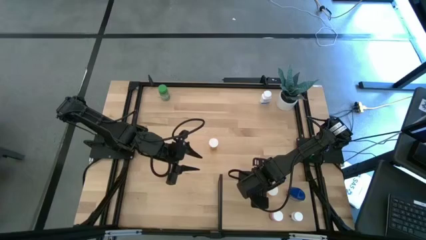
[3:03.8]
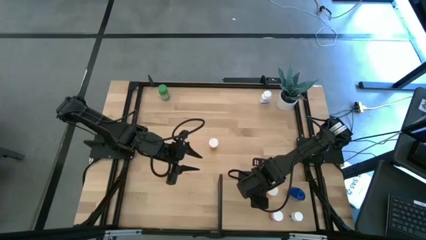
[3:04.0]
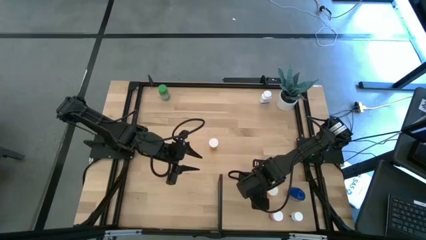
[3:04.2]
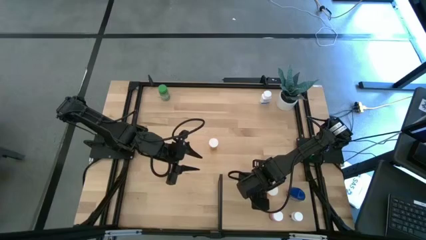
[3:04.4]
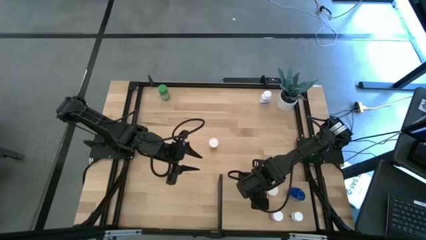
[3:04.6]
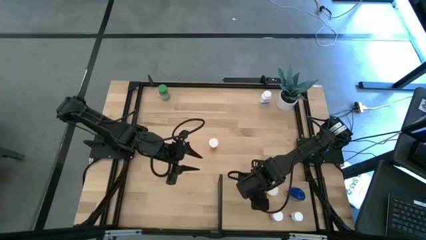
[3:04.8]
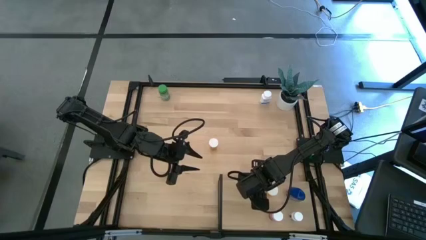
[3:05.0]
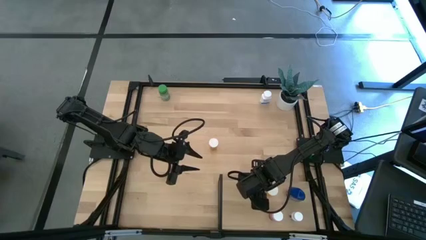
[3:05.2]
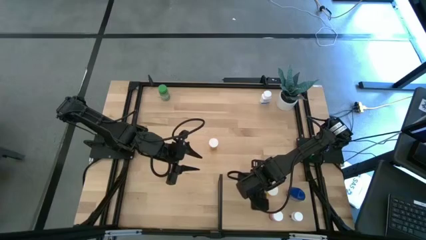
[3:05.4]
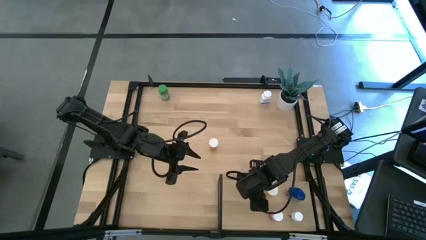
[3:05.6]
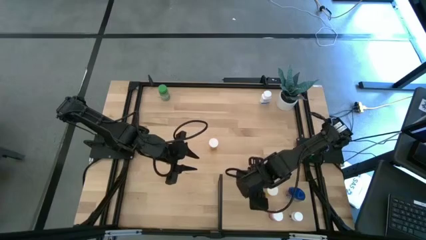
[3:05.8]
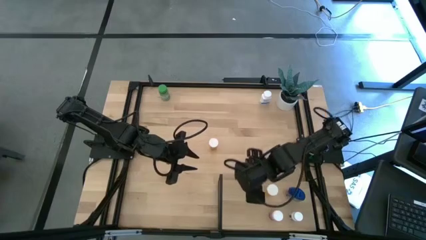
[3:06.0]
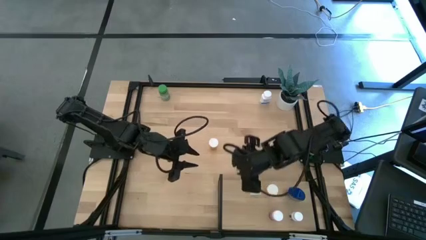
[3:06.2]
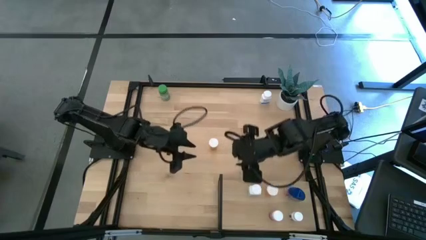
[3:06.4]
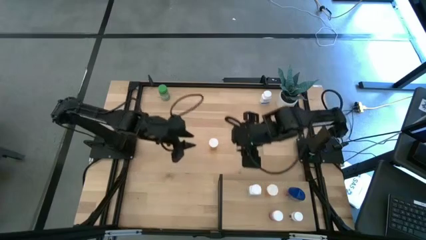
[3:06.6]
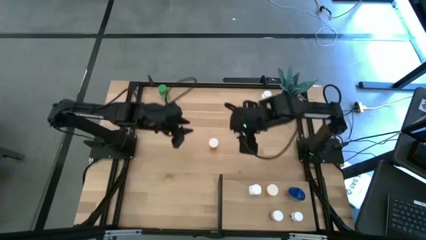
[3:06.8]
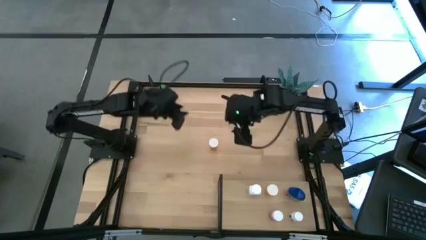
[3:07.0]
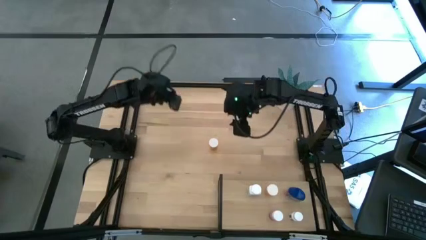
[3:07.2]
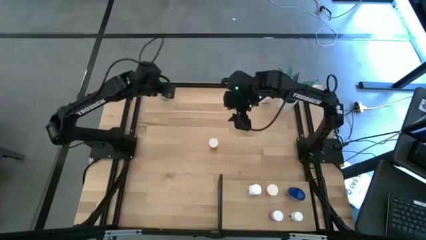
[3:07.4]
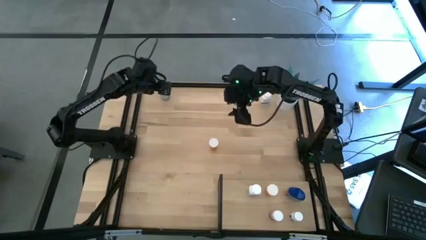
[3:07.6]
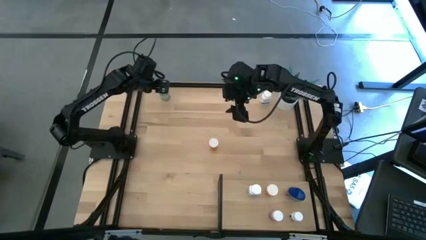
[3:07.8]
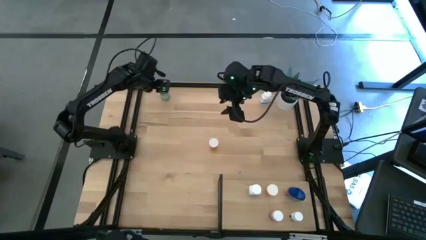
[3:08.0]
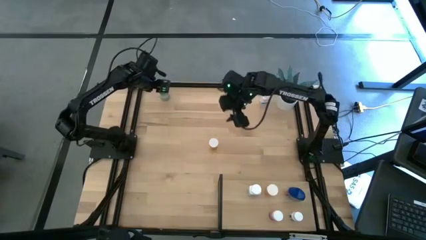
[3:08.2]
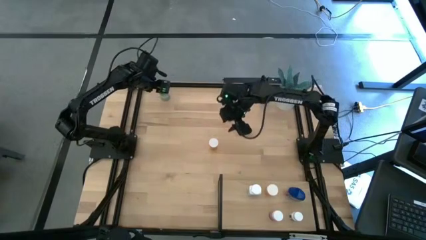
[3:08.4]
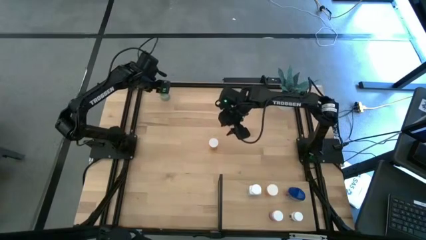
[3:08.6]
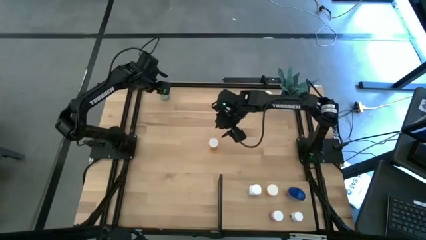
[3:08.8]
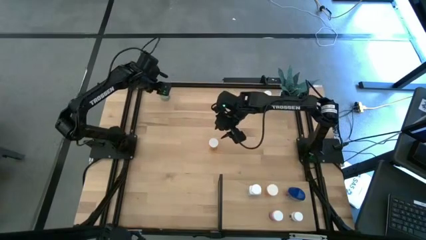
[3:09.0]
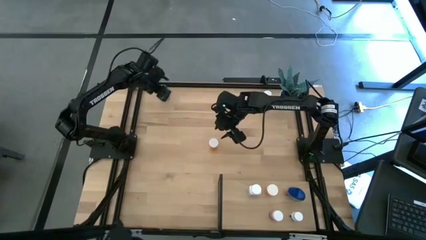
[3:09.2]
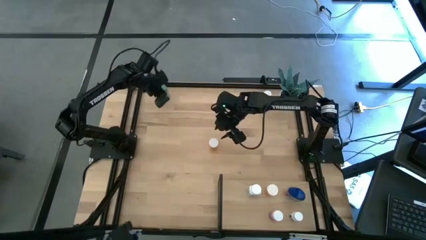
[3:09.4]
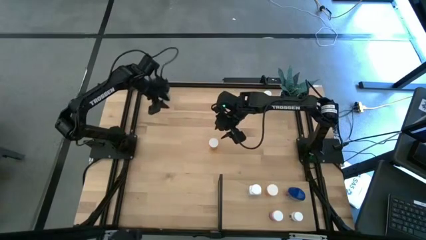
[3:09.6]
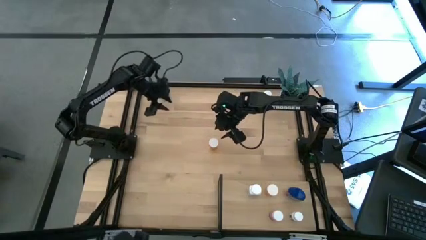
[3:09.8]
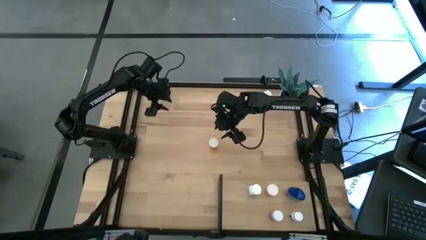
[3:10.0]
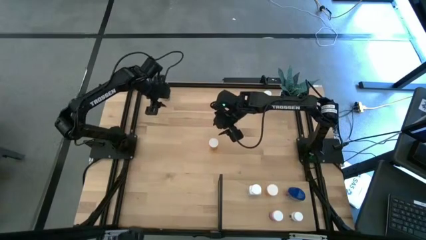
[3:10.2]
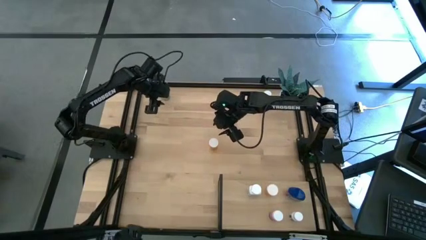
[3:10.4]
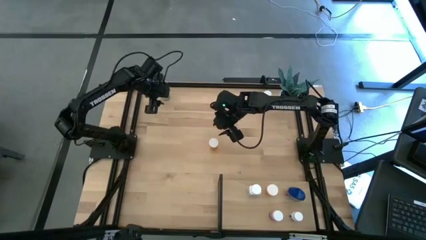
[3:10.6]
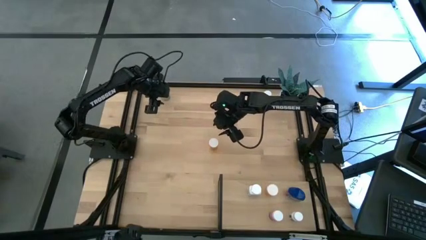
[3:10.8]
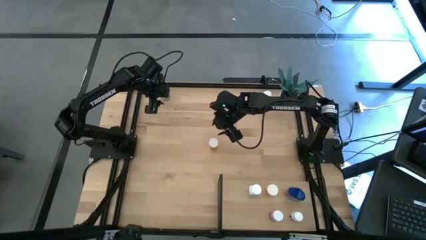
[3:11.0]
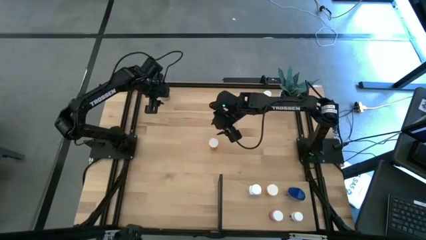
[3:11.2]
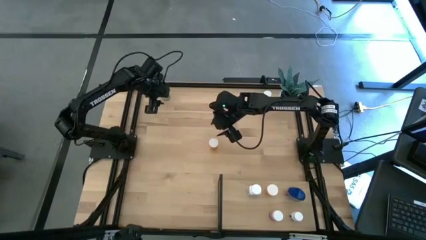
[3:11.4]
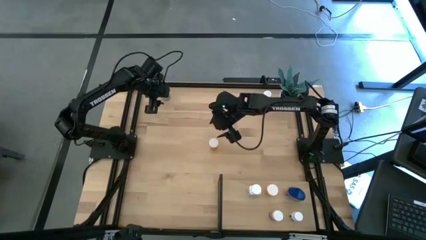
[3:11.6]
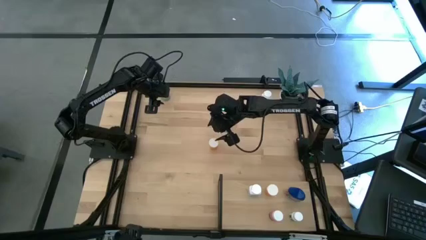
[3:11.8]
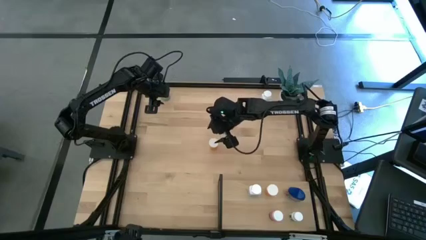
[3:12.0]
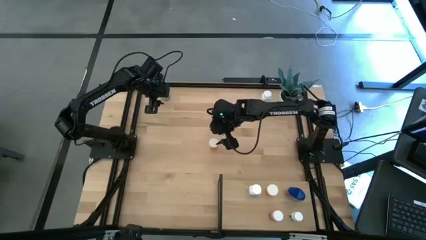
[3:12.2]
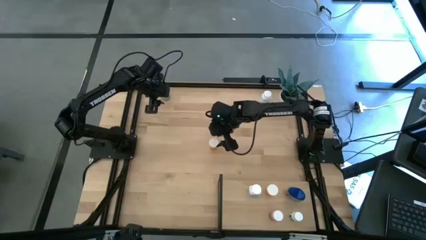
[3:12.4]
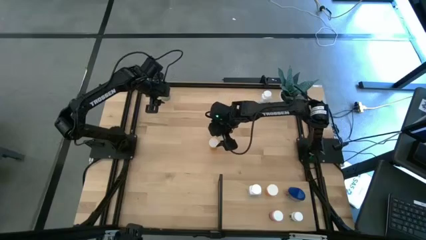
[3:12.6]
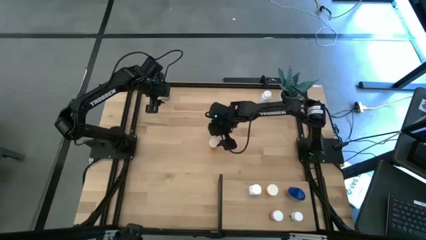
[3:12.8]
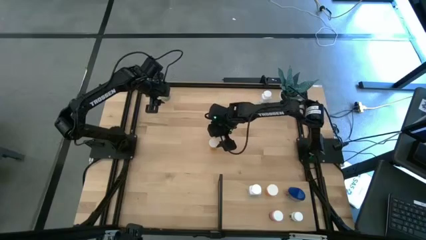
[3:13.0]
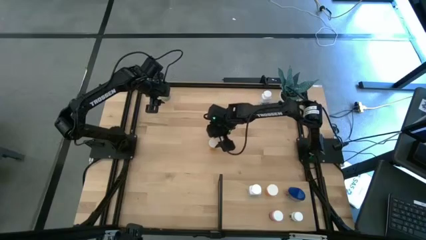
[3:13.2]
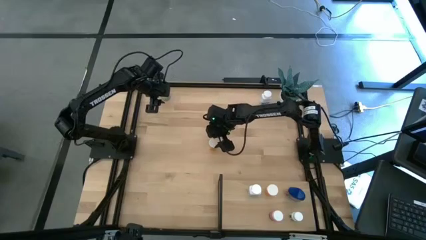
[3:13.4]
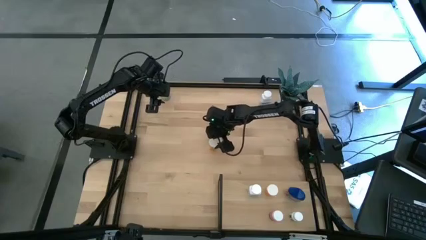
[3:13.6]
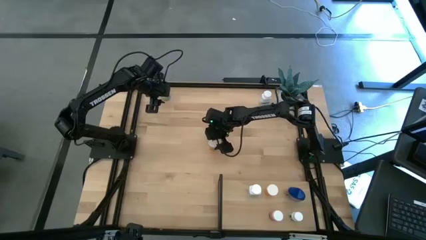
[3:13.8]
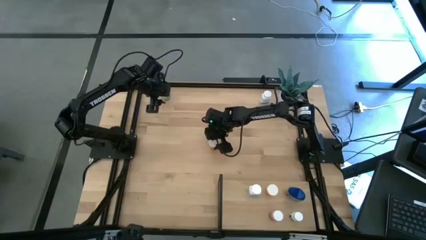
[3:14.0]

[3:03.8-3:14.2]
Task: Pick and place medicine bottles onto shelf by color
Put the orange pill bottle onto the shelf

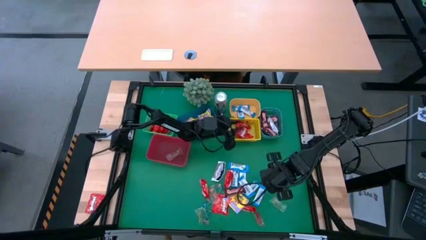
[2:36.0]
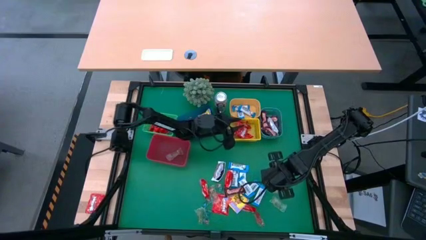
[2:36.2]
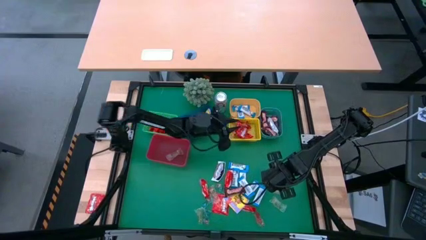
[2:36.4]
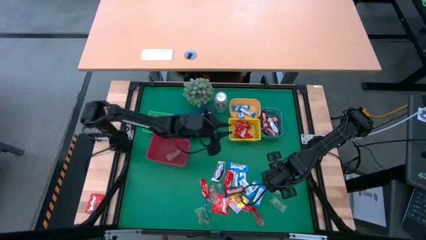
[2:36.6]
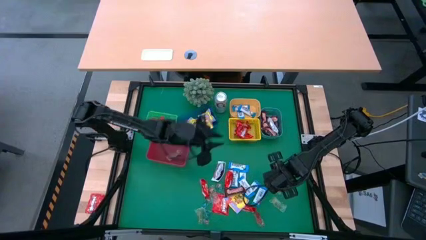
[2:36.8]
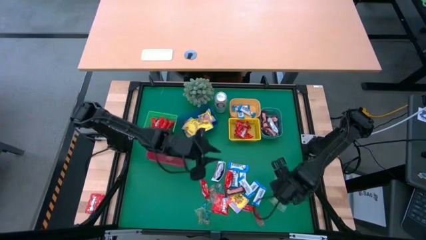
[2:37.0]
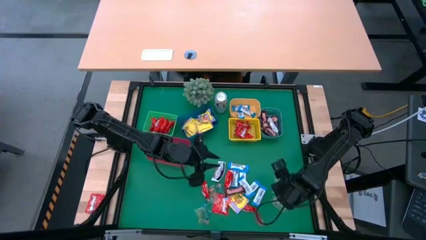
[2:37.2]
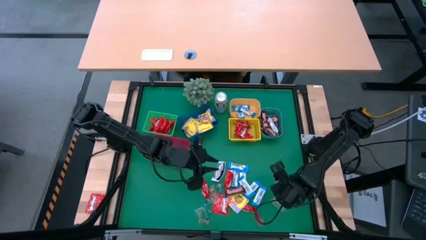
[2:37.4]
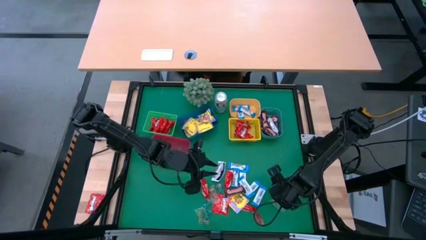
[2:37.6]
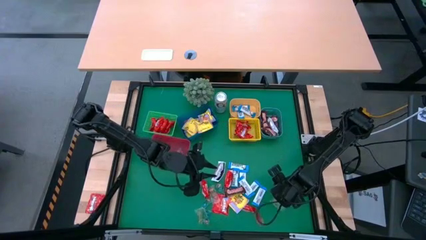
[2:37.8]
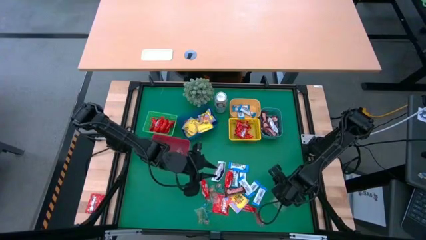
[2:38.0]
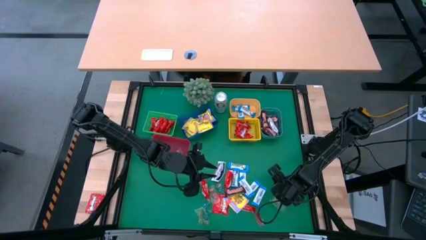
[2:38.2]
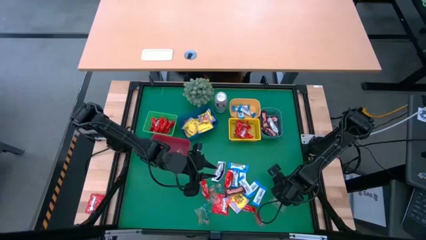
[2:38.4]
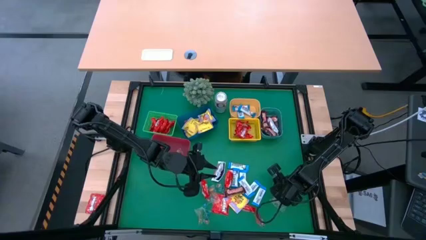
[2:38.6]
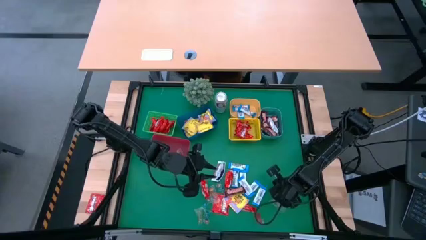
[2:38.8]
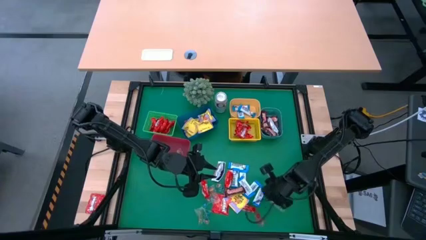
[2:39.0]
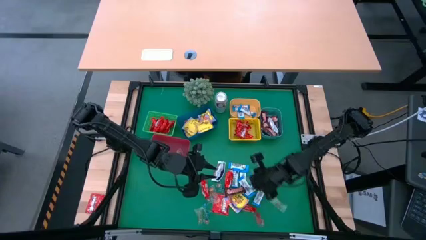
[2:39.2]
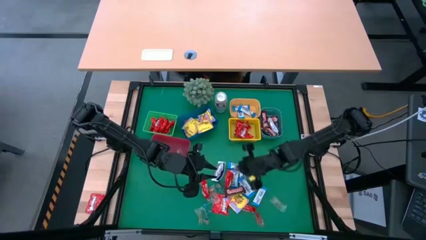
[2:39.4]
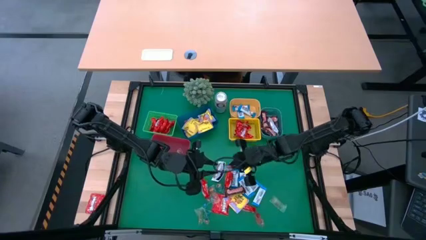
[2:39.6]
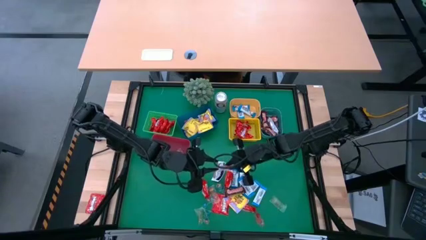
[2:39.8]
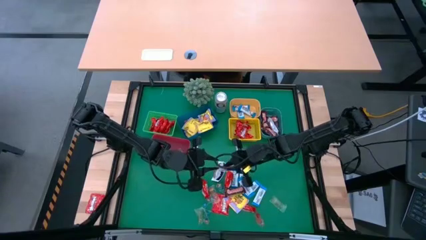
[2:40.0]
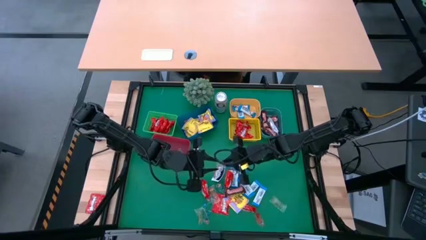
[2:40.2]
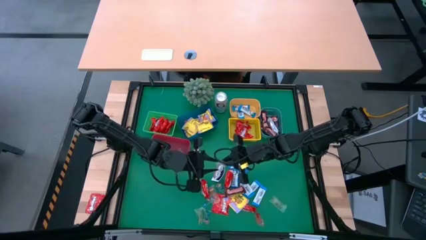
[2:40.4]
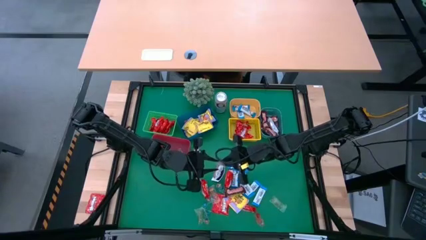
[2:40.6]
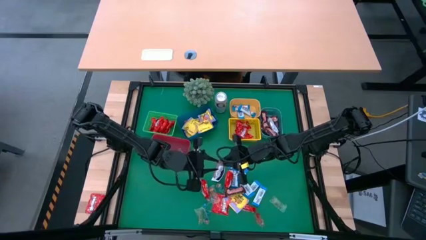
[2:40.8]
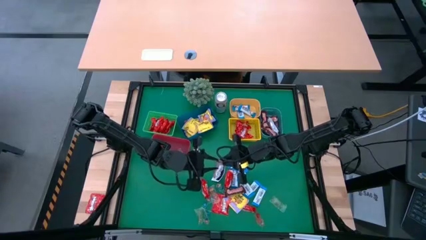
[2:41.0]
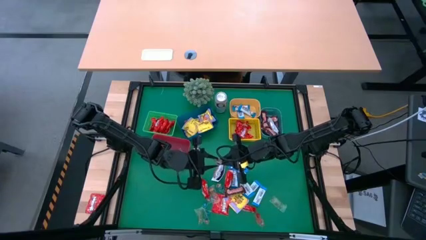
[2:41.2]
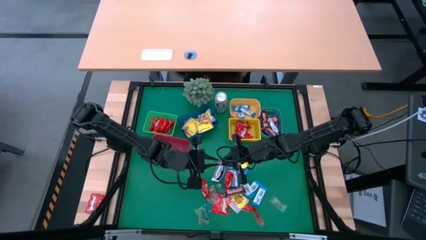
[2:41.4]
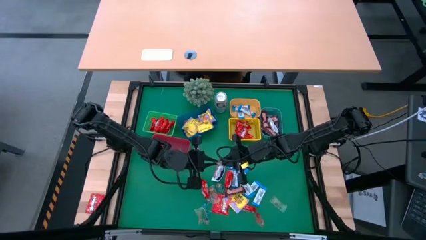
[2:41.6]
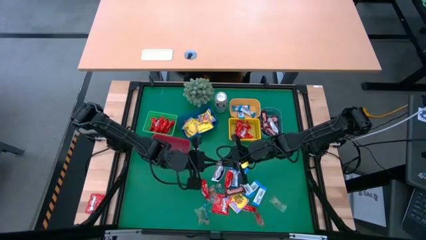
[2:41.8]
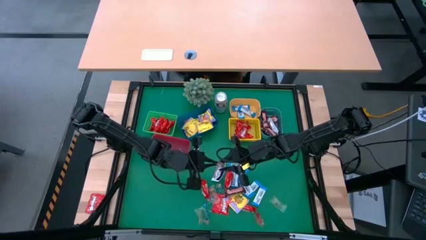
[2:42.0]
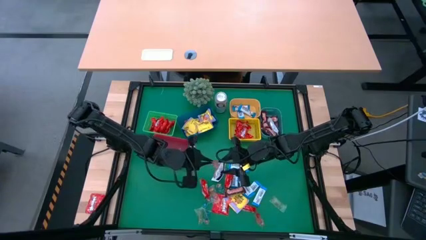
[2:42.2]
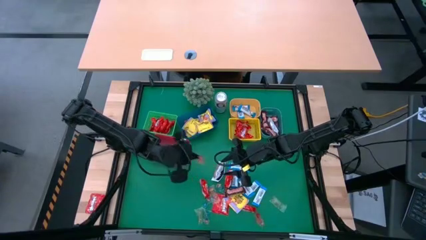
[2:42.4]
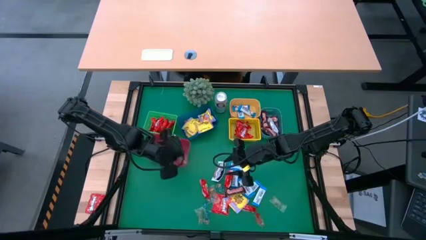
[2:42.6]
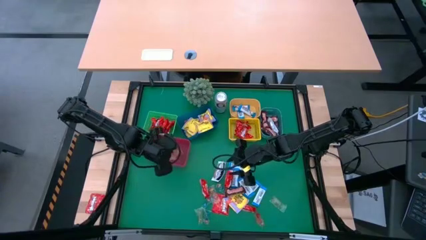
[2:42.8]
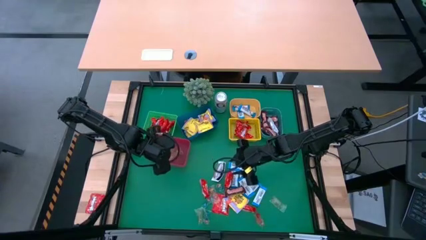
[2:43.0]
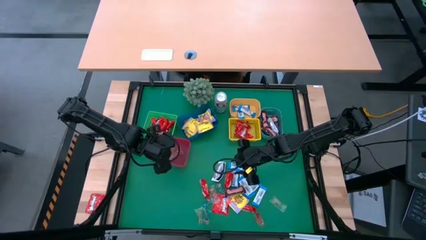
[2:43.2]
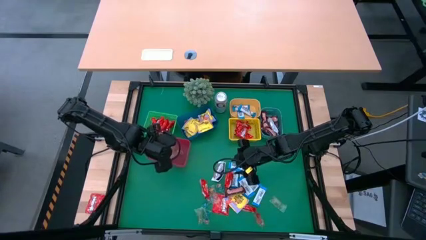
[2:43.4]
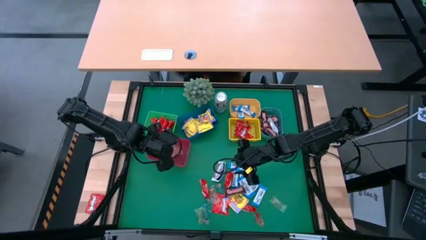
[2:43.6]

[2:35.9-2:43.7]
Task: Sort candy
Put the transparent orange candy pack into the red bin
